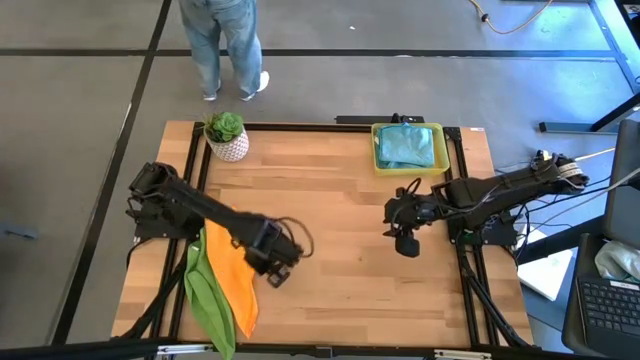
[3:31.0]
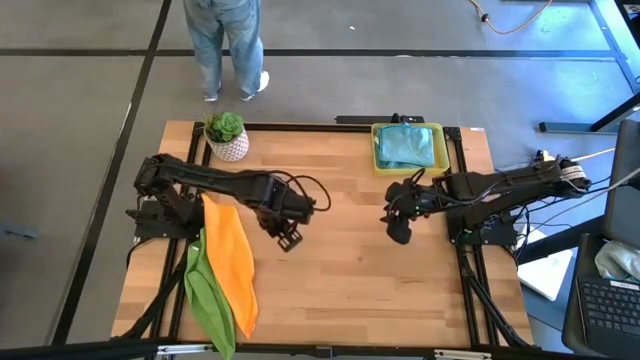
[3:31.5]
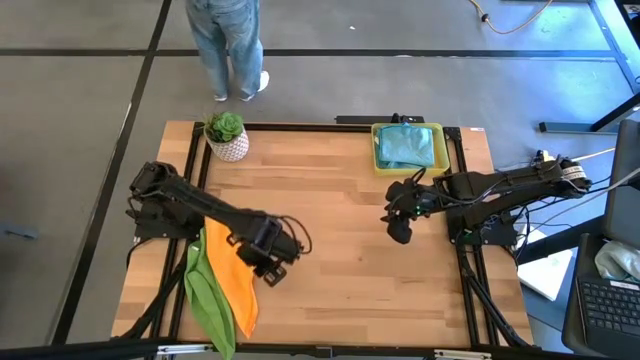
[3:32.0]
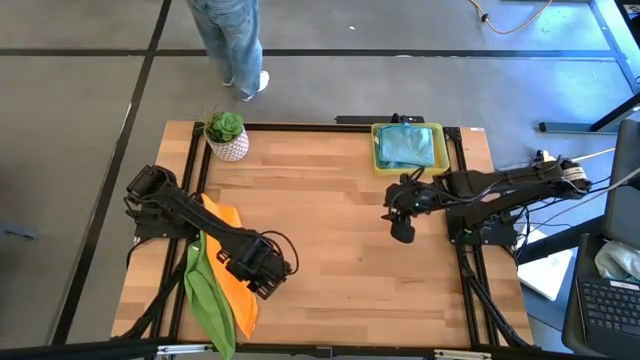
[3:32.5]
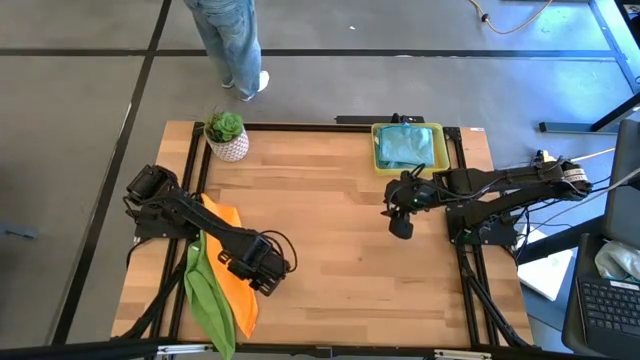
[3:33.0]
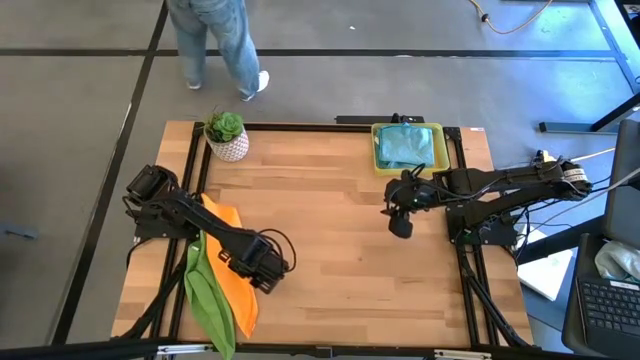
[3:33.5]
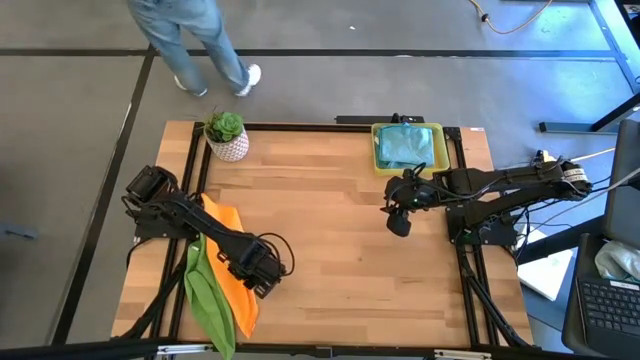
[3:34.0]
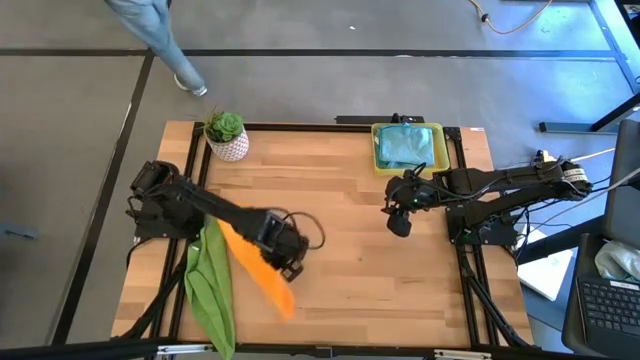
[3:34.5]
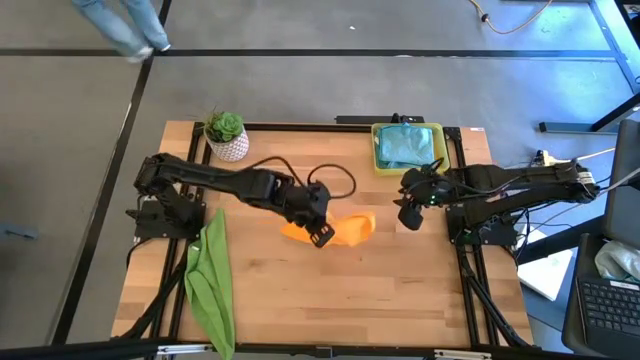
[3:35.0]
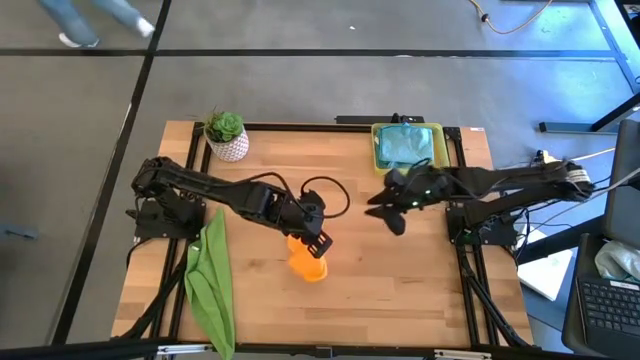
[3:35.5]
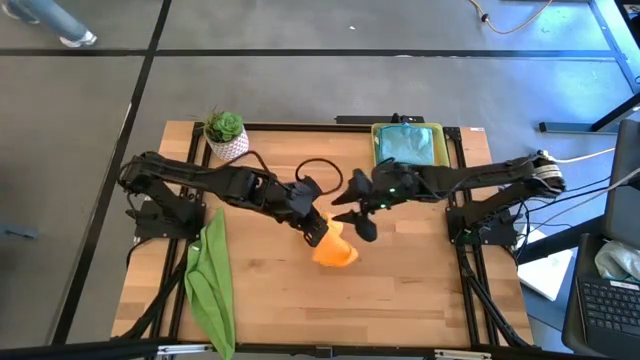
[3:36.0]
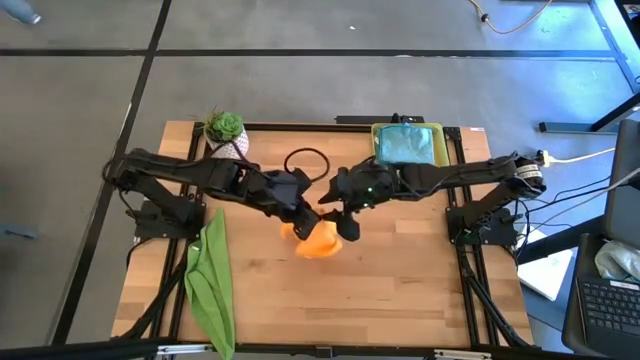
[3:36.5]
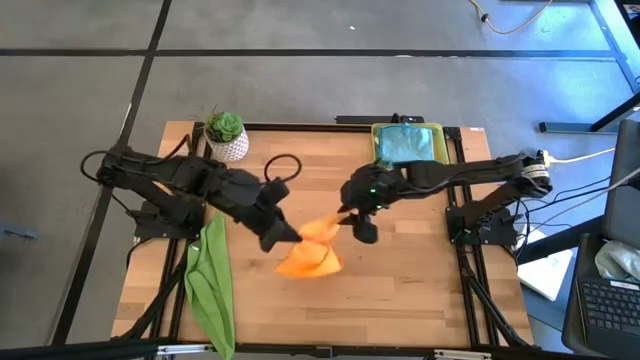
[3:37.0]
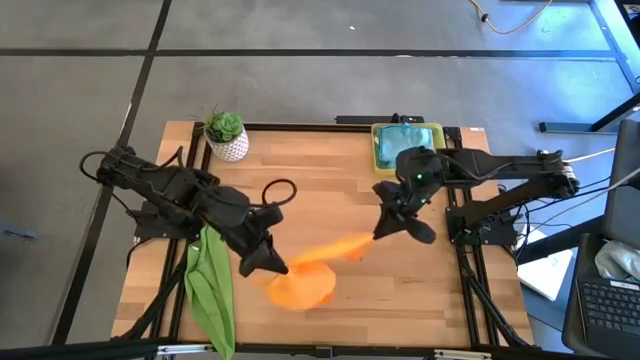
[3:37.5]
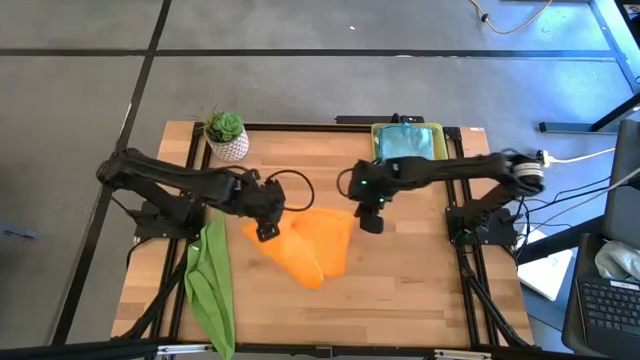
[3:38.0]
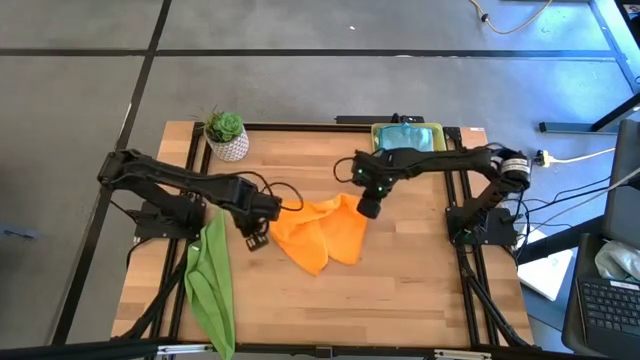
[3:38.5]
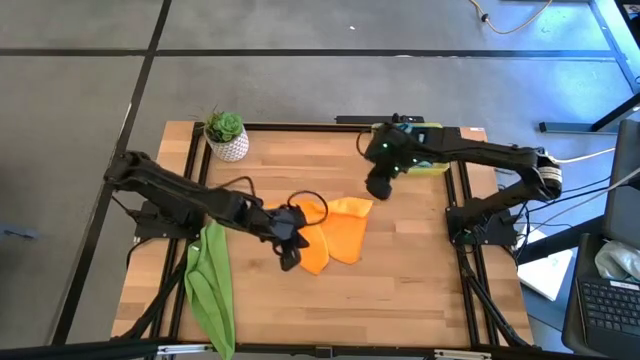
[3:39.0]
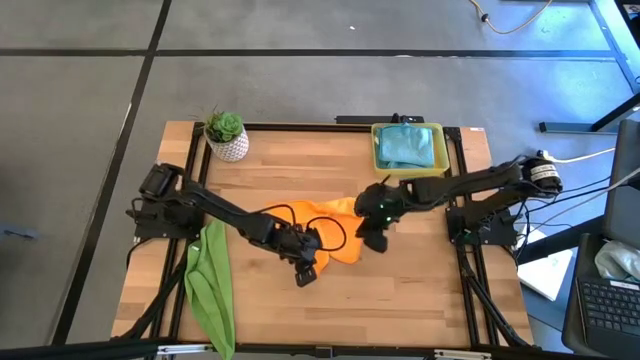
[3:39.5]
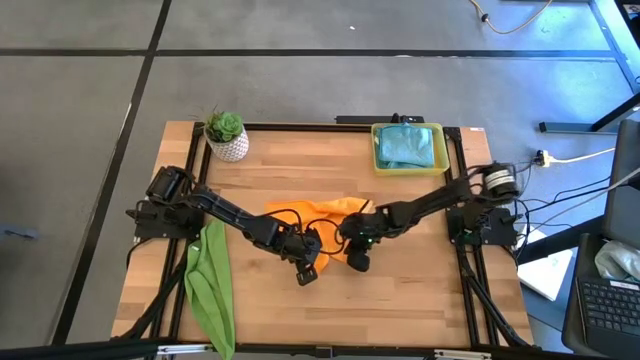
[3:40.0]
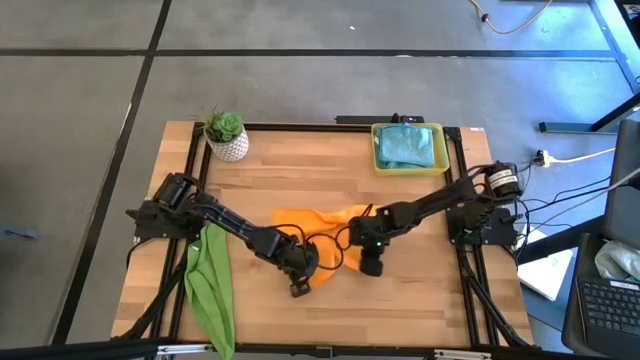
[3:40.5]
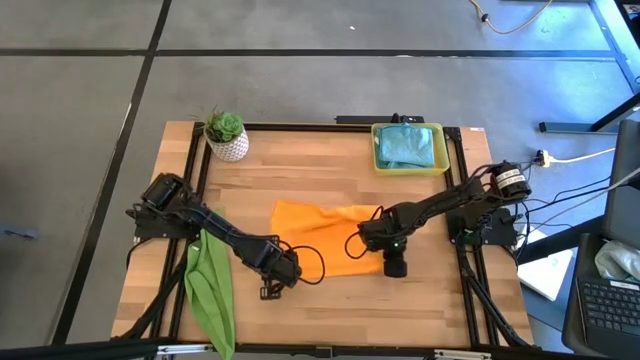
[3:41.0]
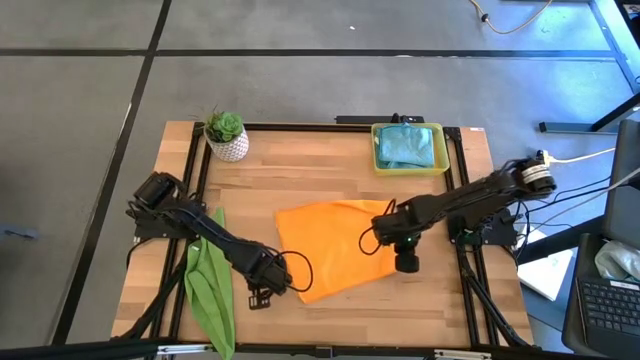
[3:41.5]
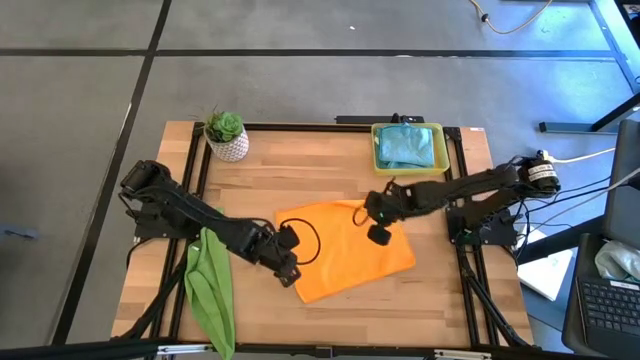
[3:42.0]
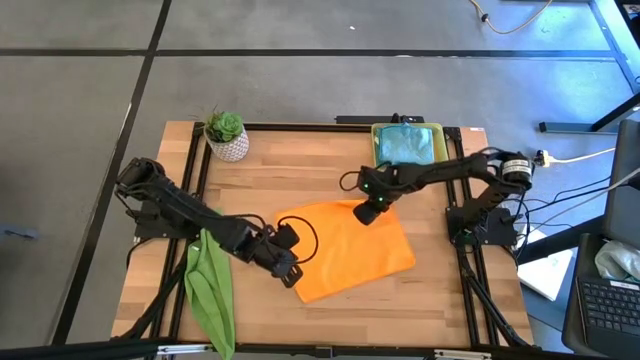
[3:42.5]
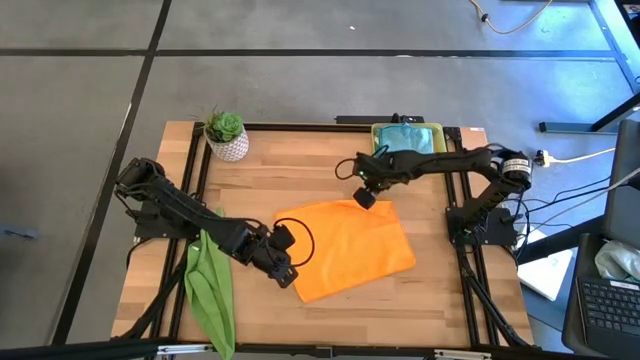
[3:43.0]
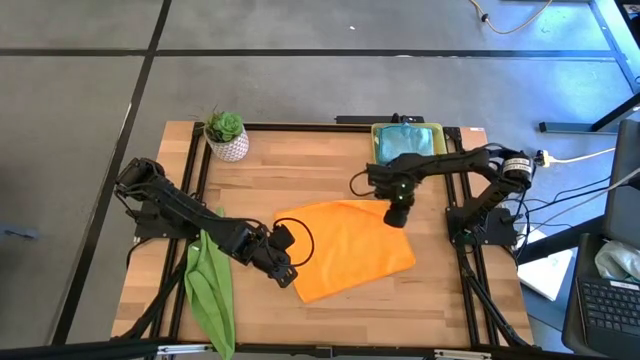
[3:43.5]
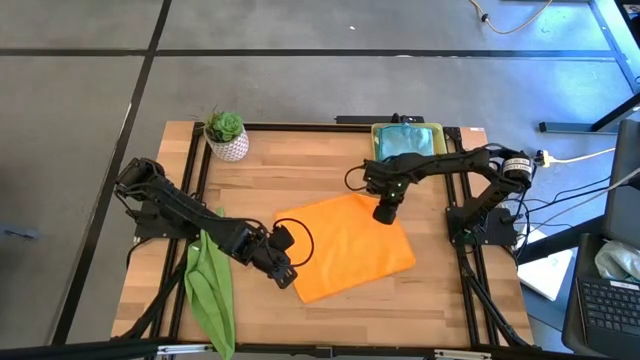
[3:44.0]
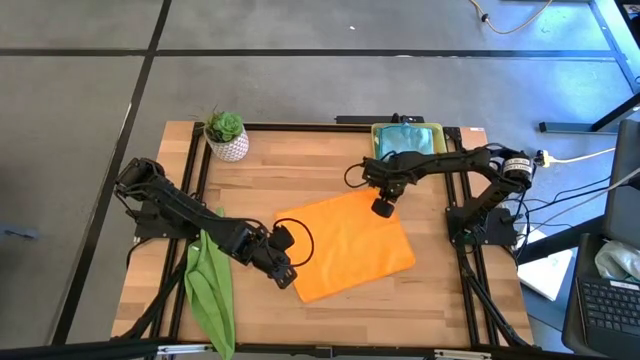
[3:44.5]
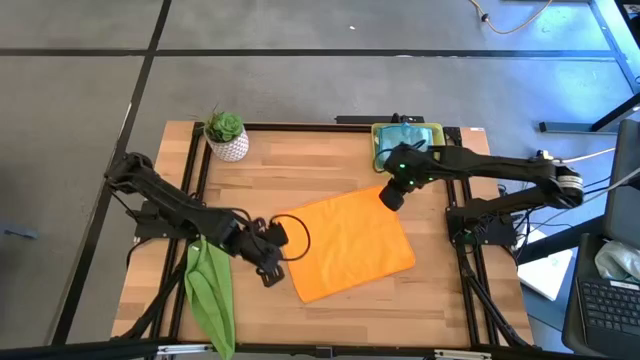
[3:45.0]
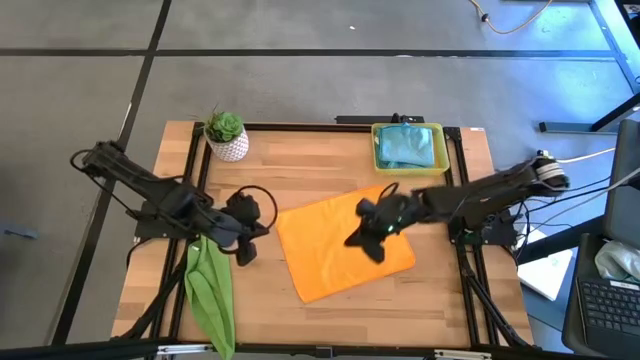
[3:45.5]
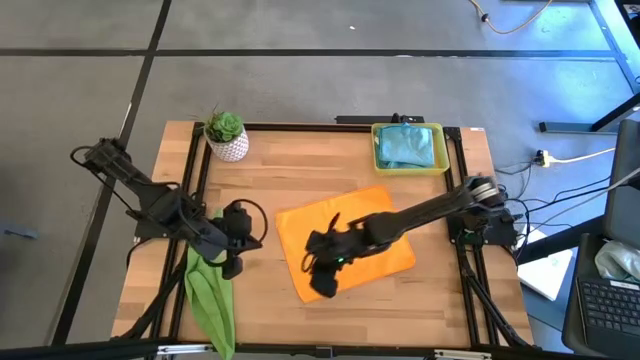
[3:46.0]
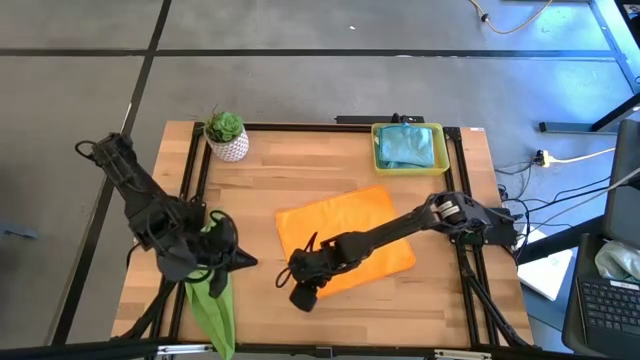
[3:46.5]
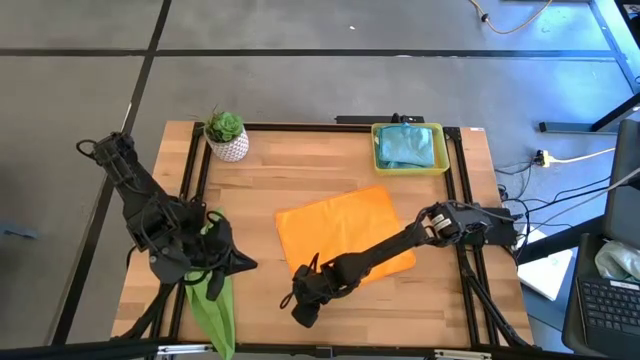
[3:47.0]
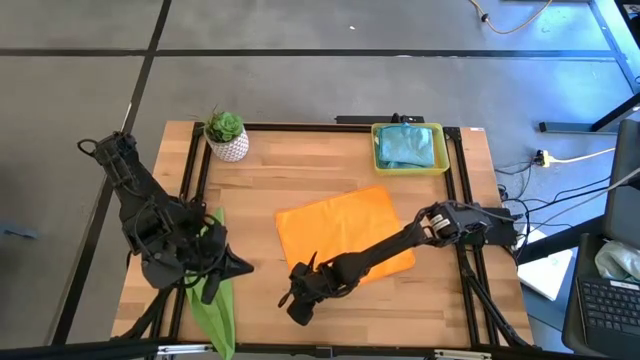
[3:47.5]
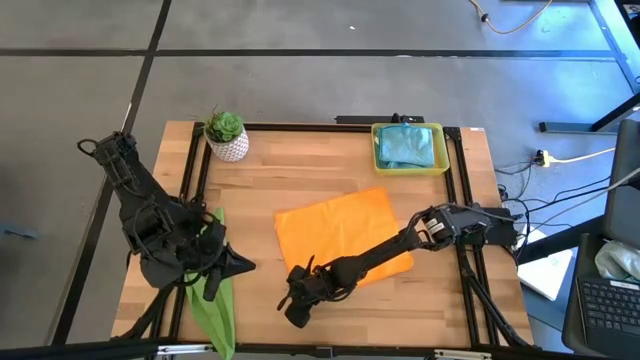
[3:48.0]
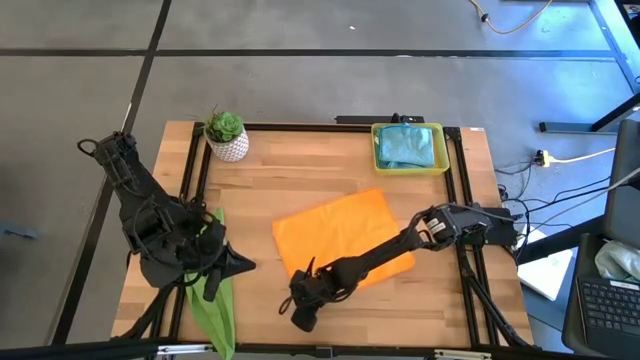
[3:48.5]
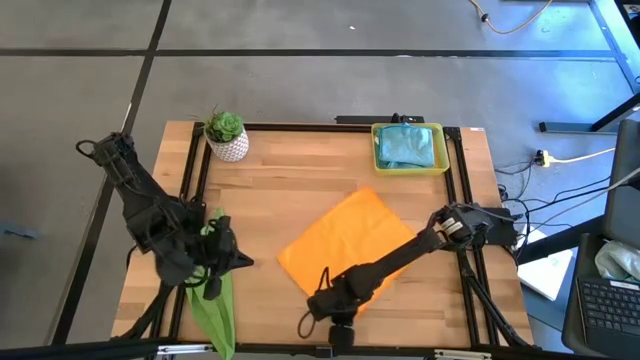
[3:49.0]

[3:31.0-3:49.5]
Task: Fold microfiber towels
Fold the orange microfiber towel

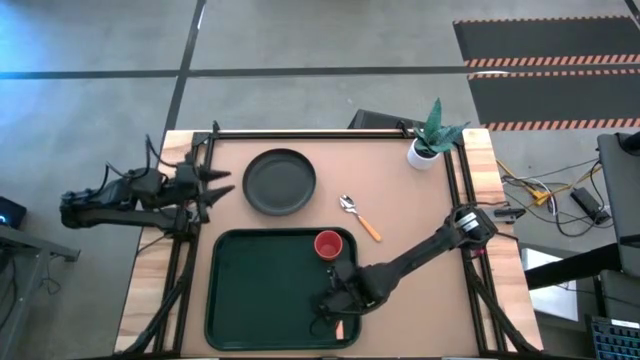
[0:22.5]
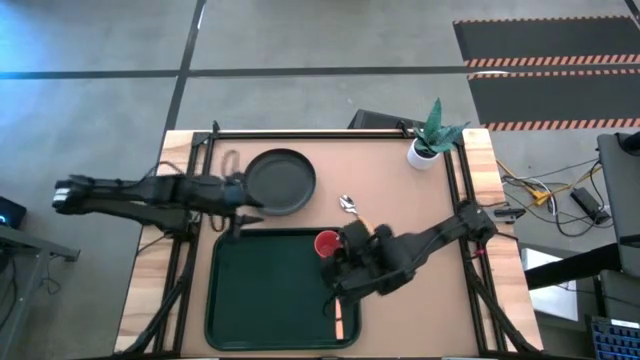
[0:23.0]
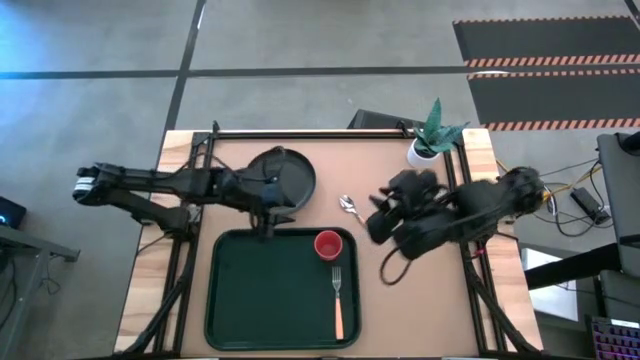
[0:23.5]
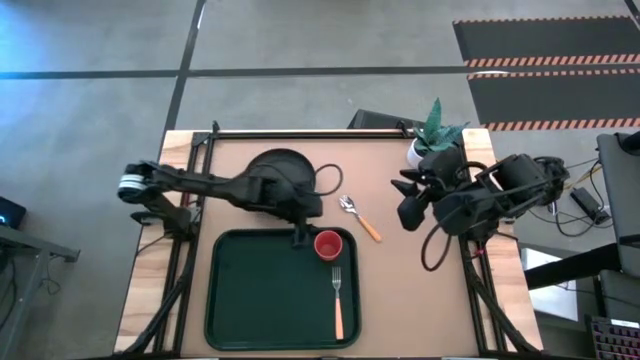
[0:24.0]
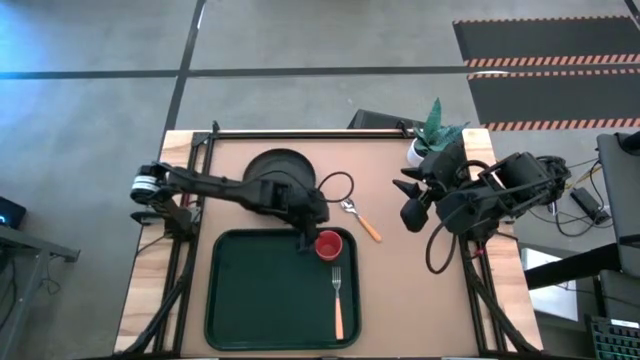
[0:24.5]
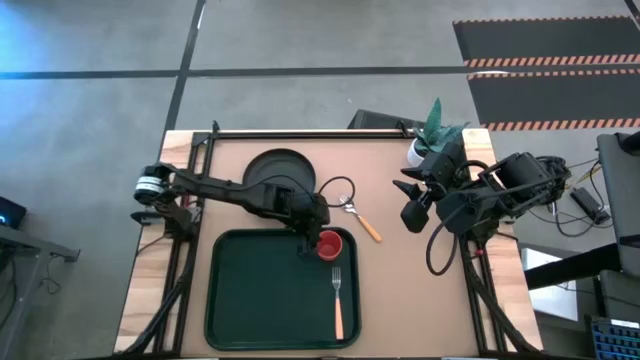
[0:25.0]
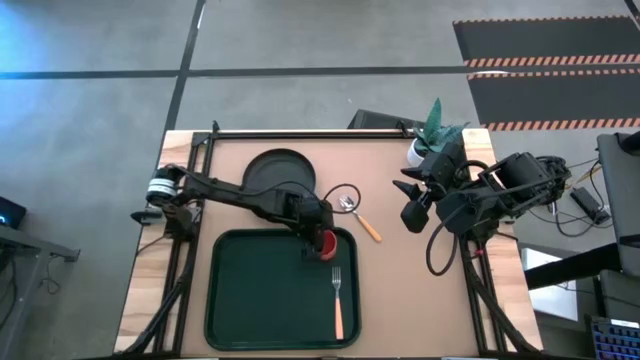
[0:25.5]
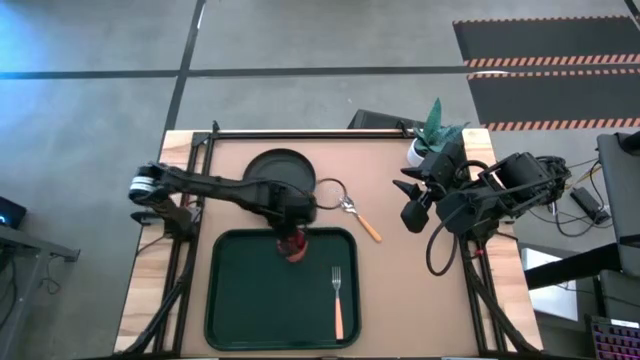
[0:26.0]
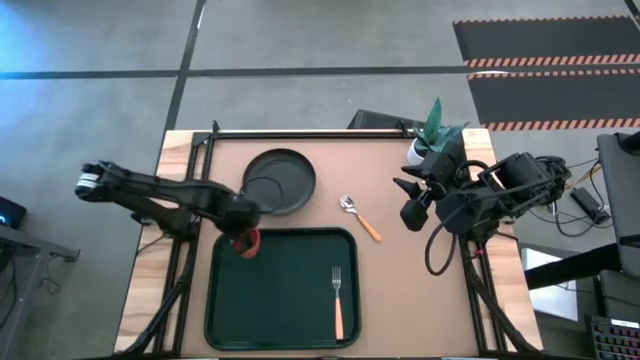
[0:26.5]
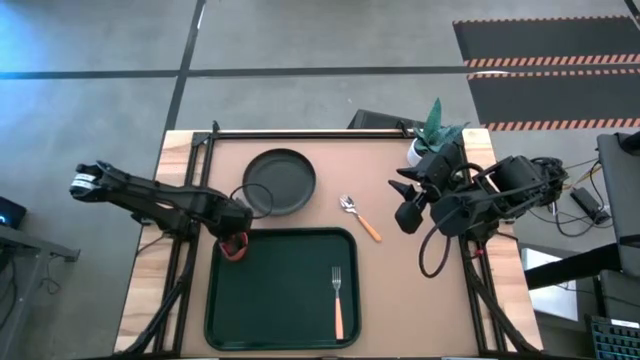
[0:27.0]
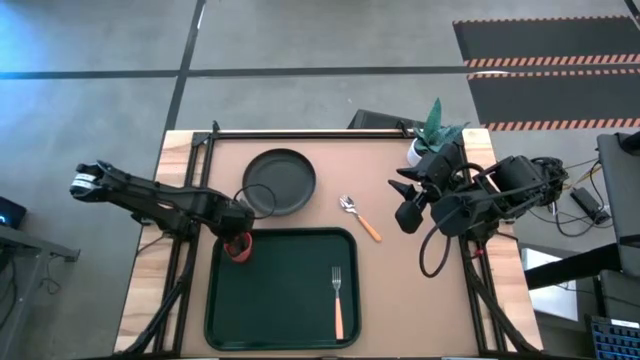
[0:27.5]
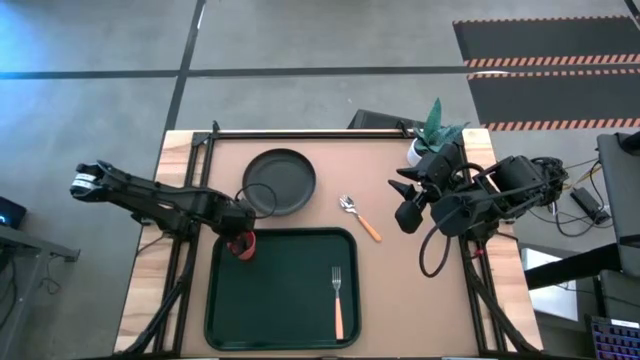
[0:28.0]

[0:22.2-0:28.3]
Task: Pick and place plate/cup/fork/spoon on tray
Move the orange cup to the top left of the black tray
